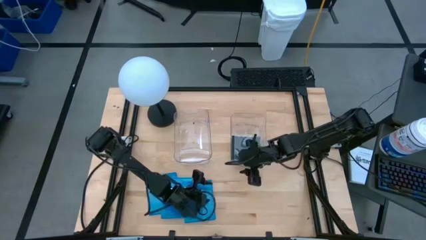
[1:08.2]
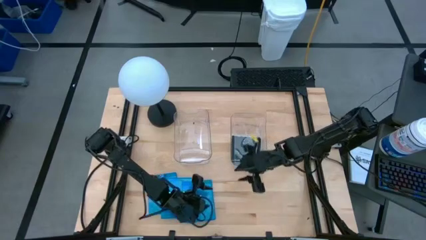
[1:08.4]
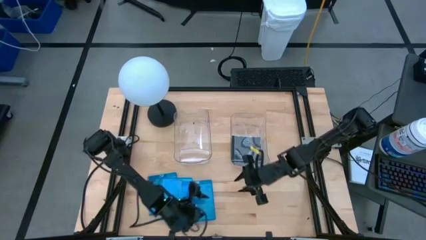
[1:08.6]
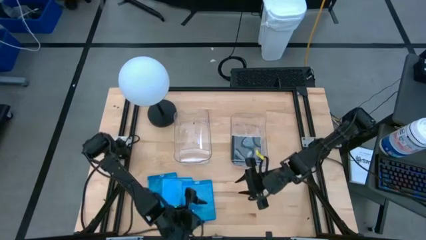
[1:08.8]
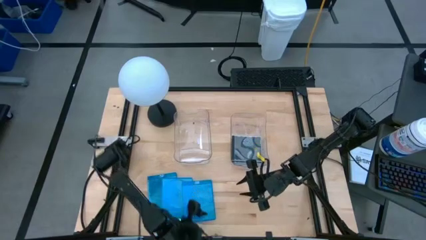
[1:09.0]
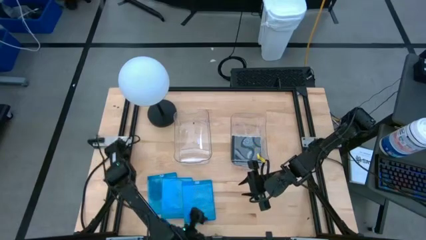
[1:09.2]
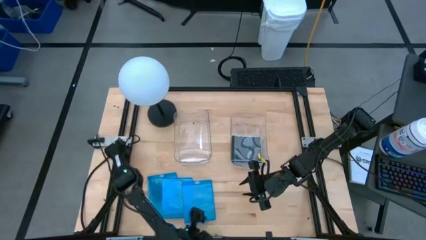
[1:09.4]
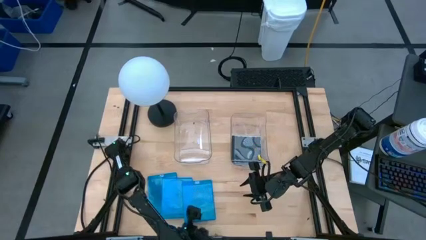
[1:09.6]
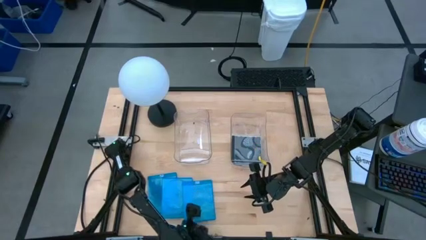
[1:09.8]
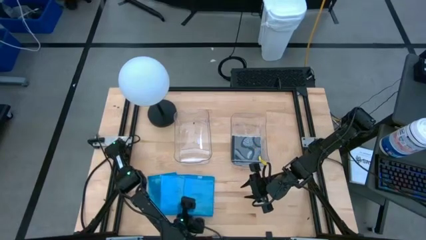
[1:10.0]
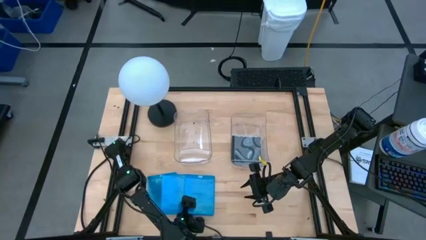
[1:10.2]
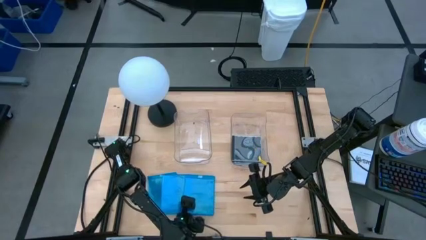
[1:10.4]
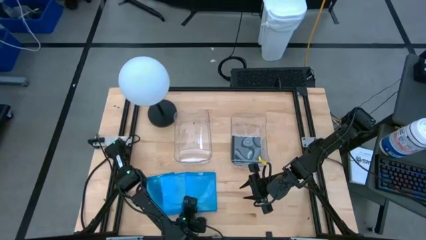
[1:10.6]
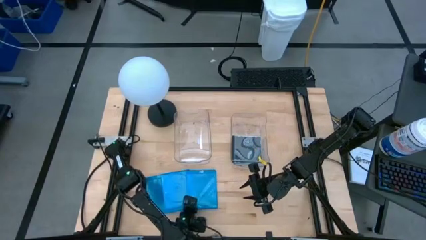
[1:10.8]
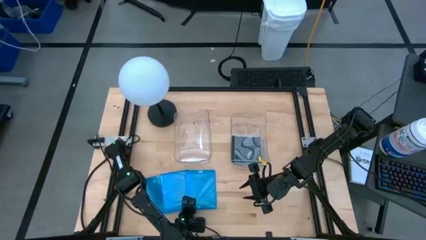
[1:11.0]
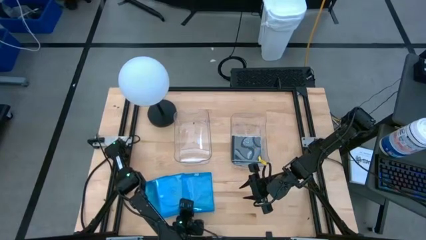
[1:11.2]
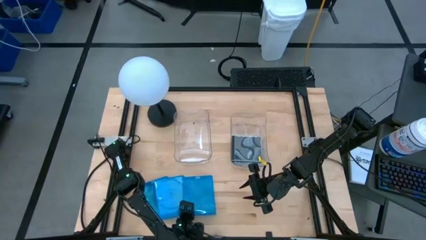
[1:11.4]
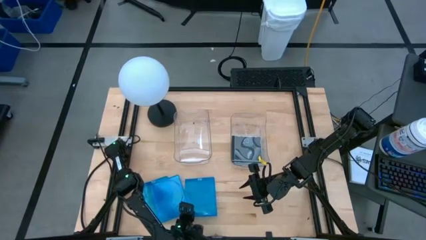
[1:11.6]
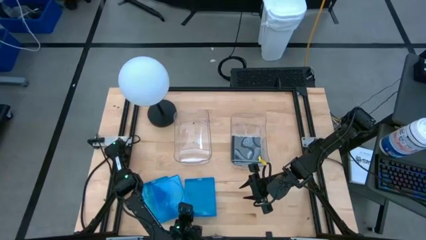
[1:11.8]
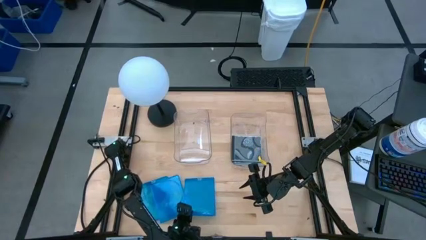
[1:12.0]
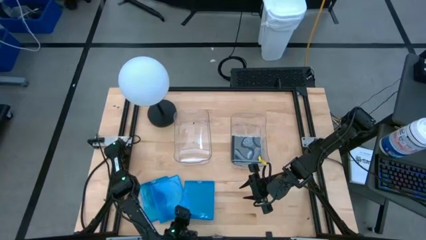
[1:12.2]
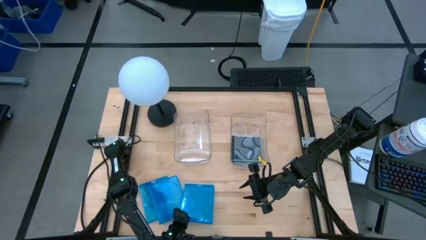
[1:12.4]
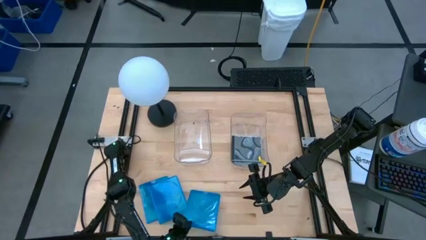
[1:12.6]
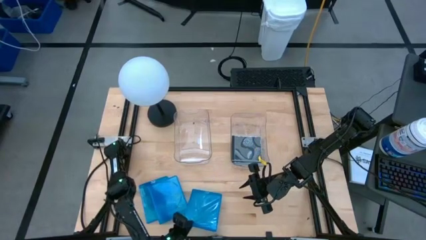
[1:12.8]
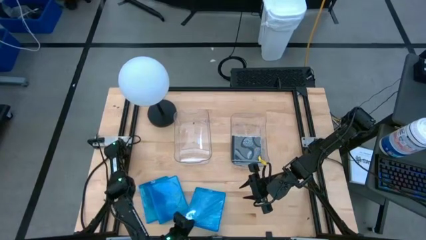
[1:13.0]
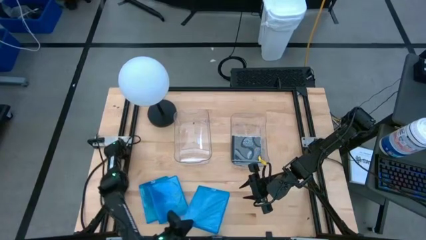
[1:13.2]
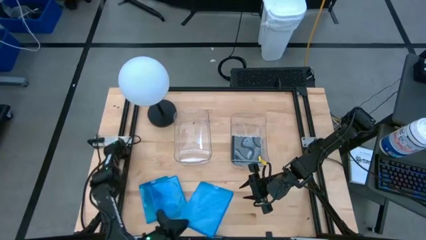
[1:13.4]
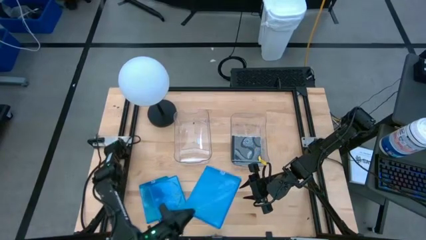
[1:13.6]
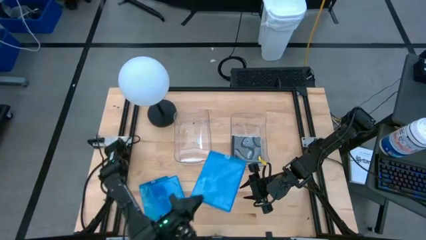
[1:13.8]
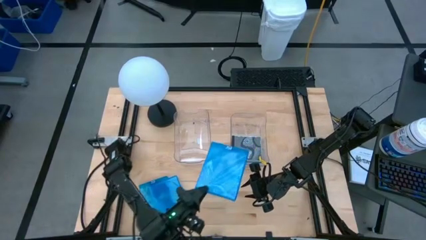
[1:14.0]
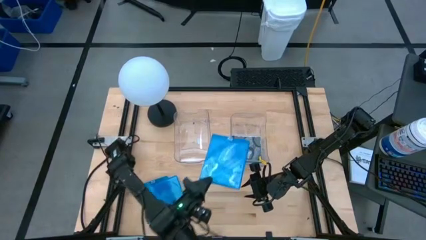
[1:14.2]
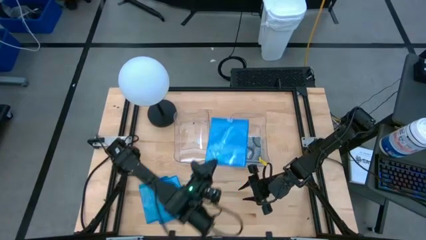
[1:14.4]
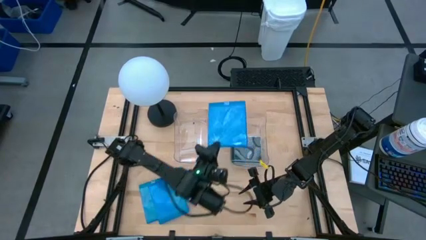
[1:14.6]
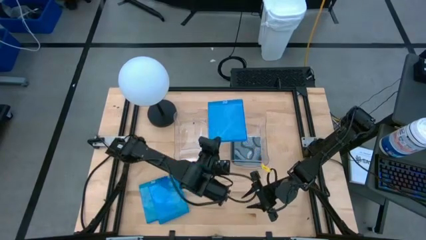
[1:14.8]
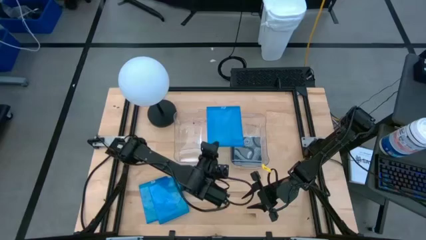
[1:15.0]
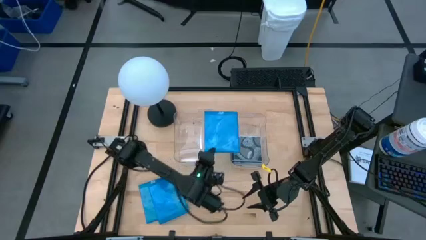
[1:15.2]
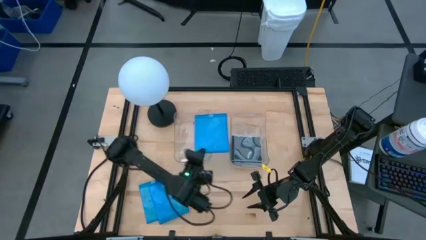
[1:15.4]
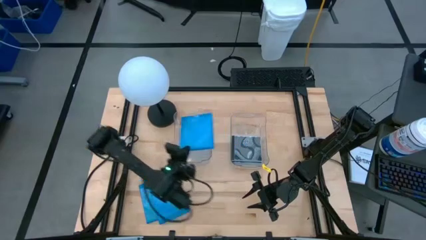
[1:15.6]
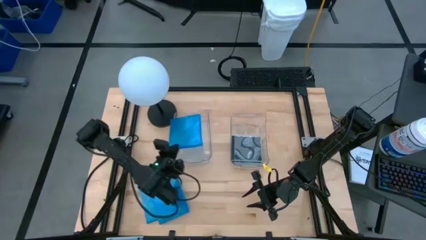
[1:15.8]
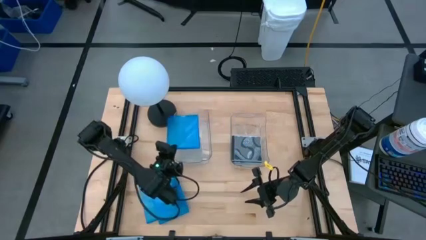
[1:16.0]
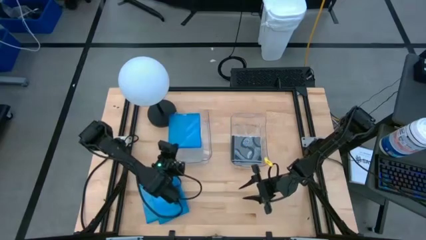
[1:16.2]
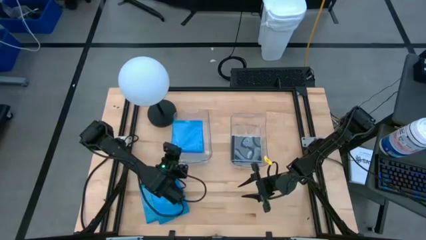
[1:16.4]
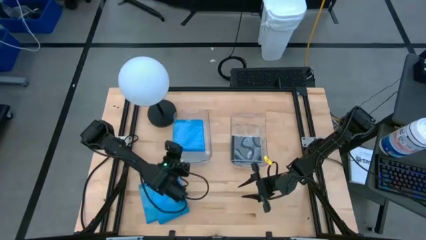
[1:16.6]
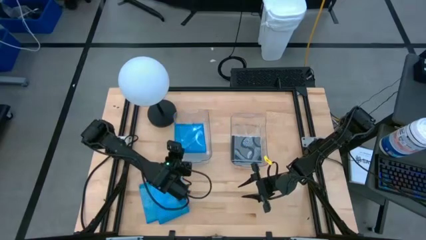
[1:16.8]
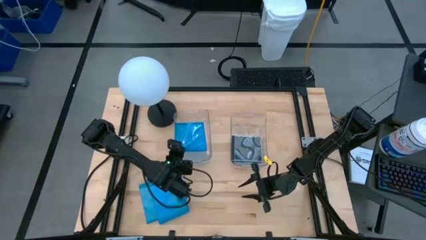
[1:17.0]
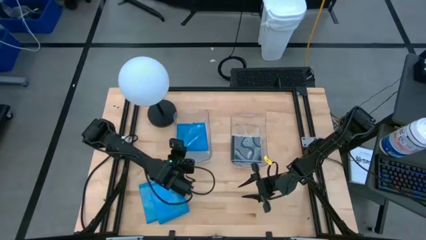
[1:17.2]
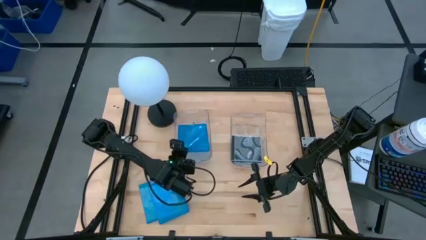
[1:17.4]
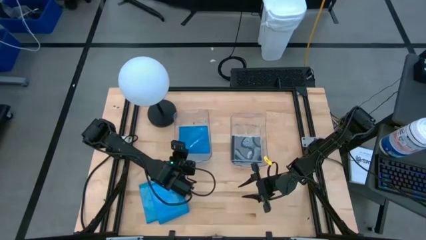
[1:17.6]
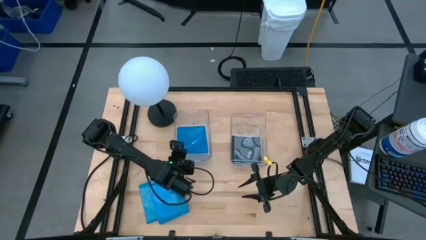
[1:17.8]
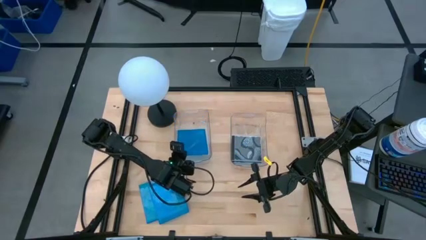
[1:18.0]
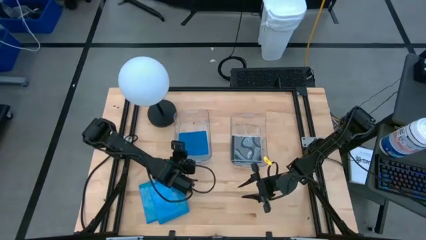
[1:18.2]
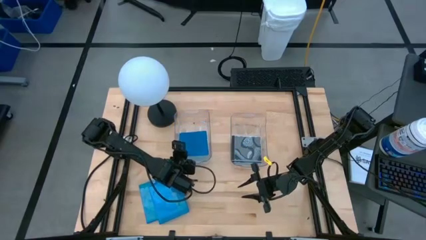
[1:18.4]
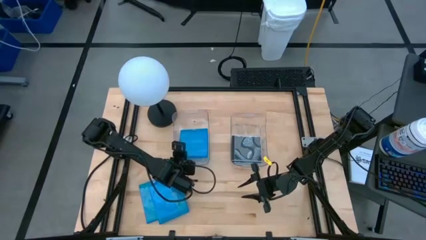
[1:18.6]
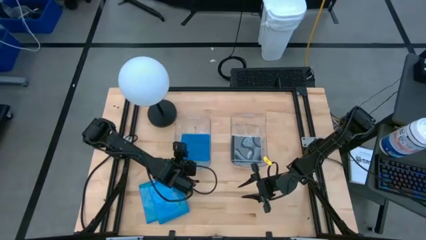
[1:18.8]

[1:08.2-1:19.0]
Task: Pick & place jewel cases by type
Put the blue CD case into the left transparent bin

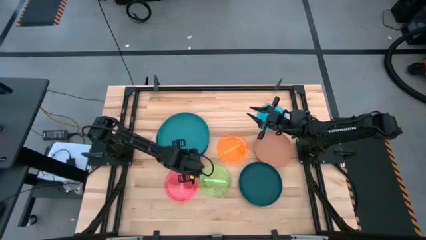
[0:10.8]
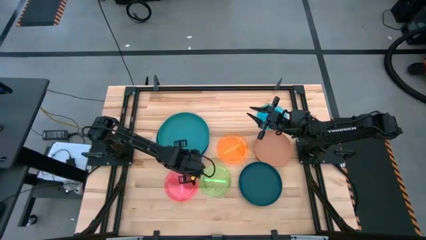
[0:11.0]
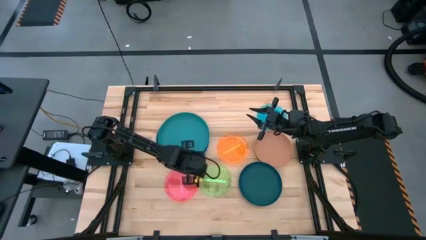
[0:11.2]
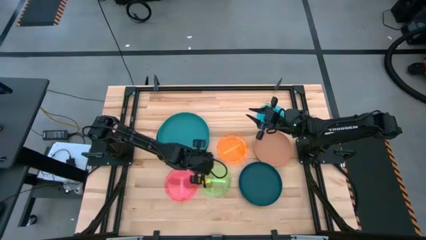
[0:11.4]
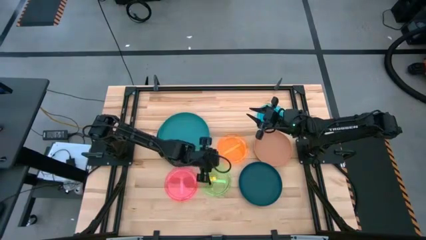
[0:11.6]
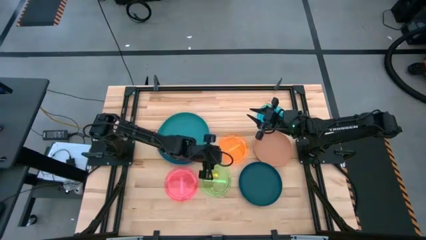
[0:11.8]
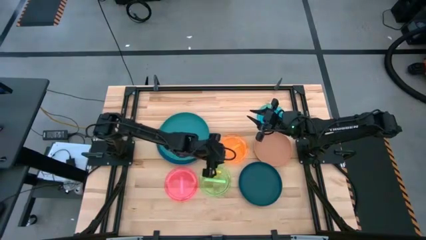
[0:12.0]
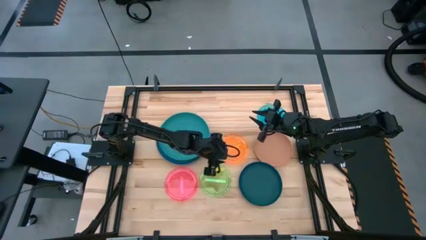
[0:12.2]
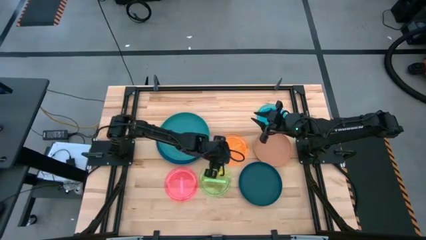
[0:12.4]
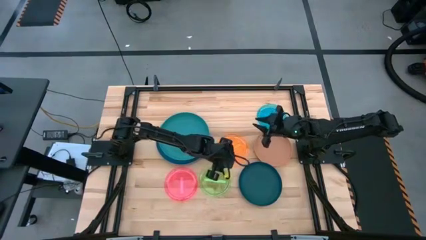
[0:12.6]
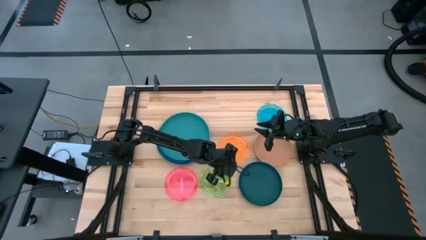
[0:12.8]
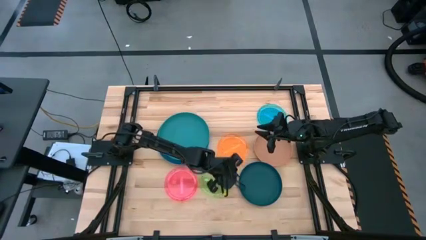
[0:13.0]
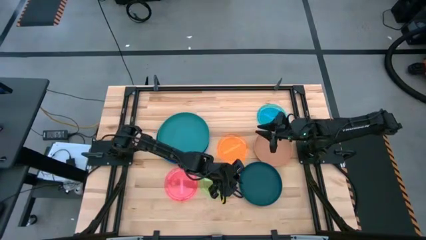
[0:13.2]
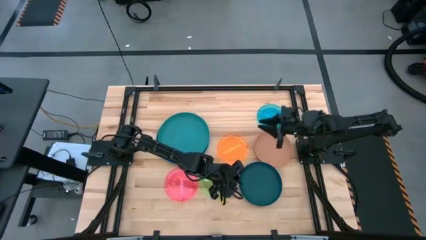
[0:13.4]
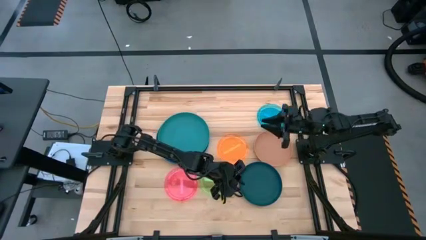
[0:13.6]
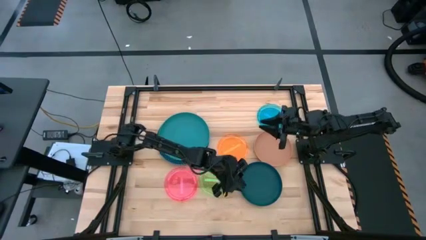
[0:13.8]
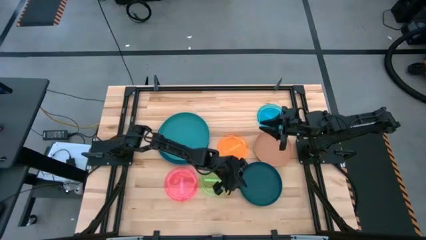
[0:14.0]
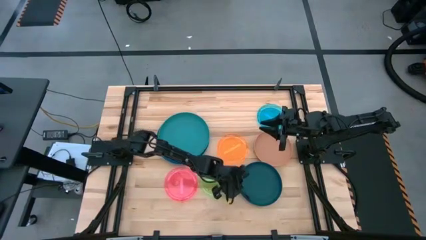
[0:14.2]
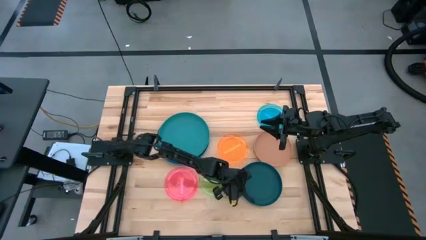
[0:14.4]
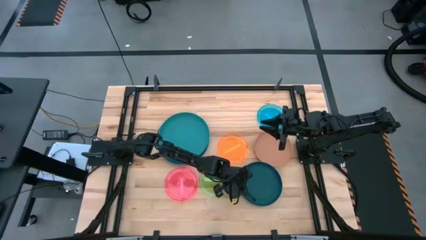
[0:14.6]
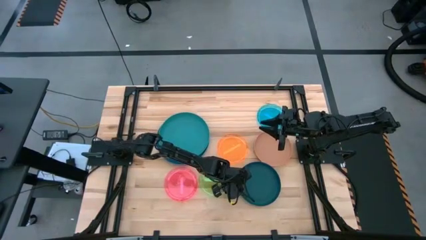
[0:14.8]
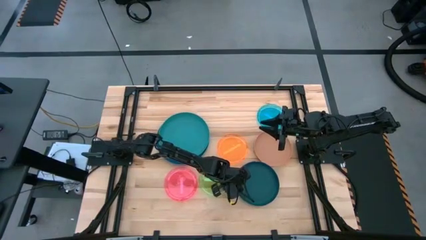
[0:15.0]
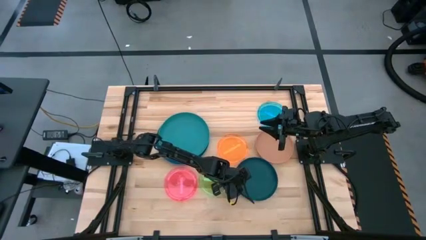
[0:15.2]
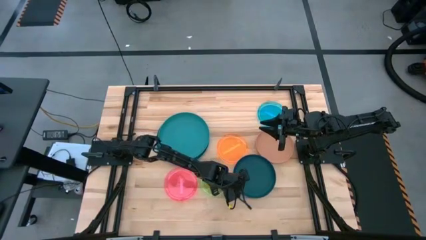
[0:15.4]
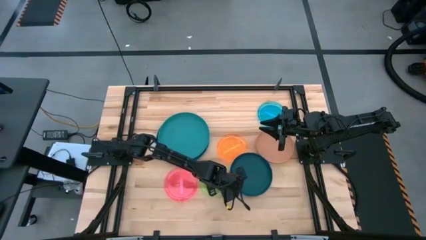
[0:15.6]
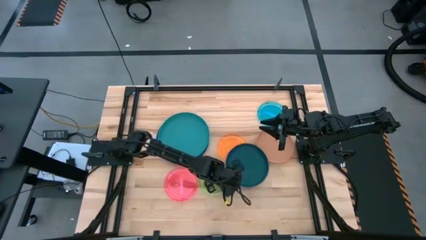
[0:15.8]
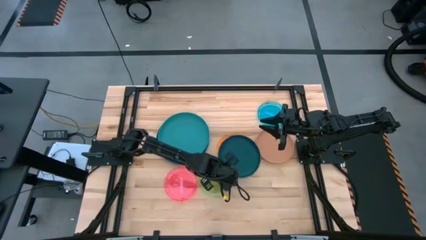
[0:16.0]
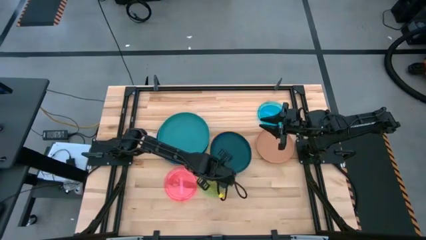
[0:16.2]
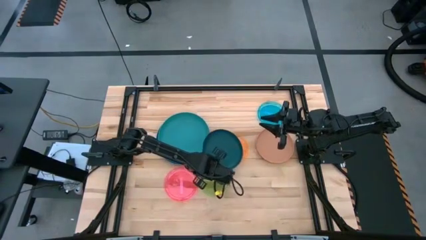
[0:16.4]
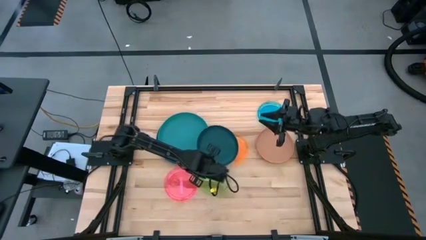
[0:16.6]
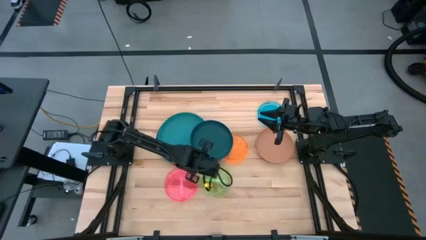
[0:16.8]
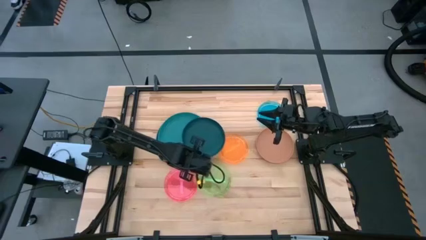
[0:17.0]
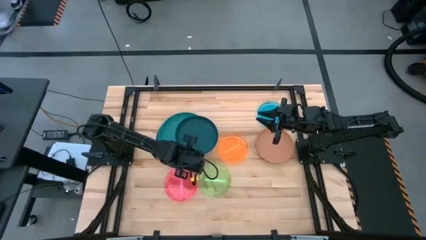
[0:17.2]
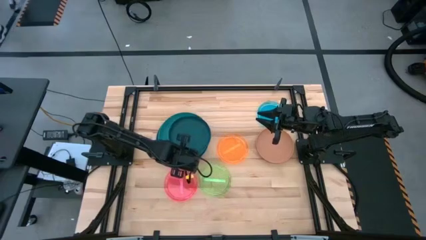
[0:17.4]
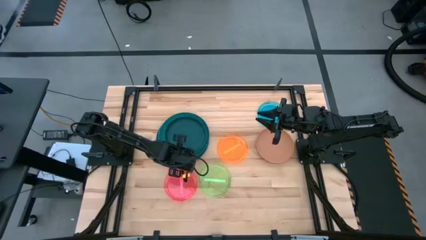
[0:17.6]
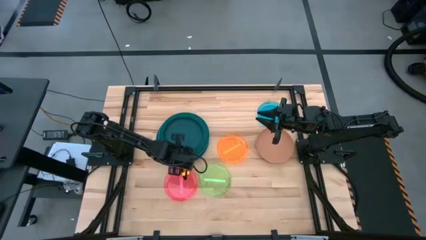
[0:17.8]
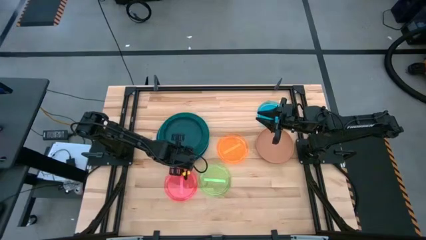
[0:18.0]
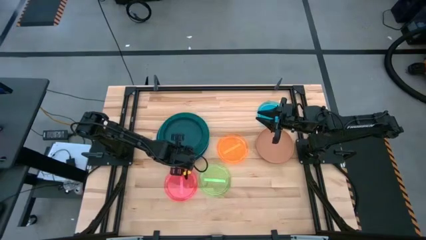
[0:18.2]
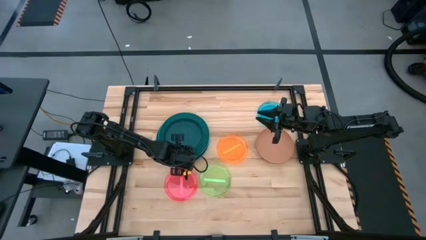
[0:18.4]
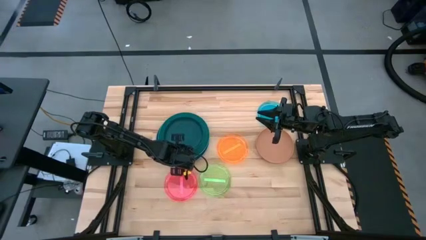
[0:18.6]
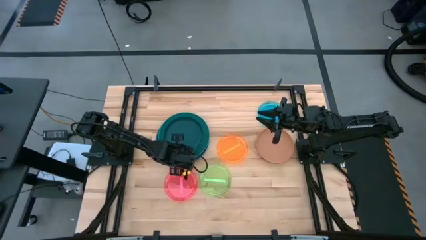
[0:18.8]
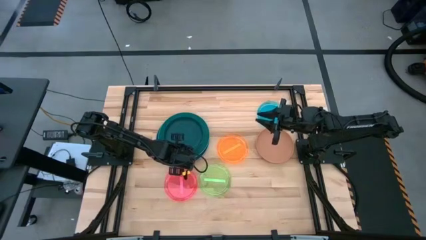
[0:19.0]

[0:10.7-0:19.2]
Task: Stack plastic plates
Stack the dark blue plate on the green plate
